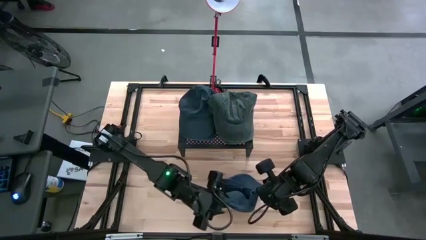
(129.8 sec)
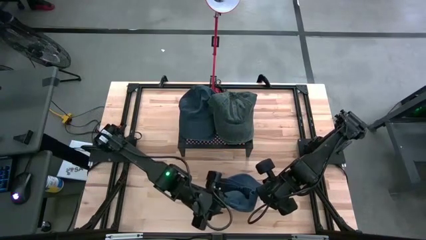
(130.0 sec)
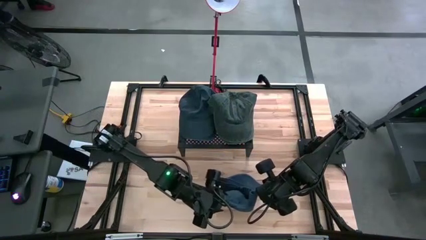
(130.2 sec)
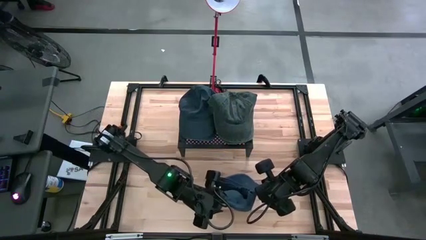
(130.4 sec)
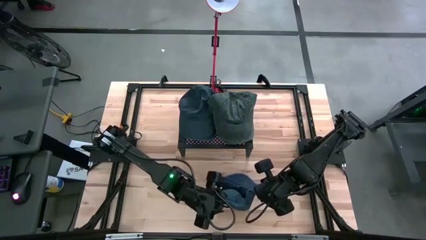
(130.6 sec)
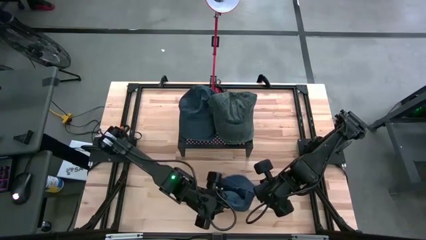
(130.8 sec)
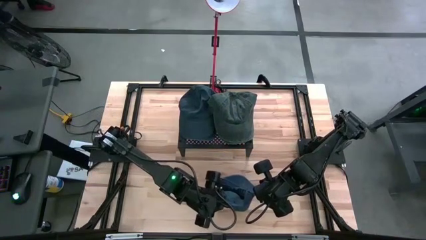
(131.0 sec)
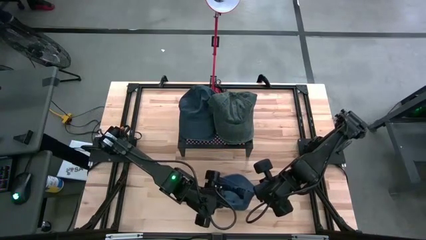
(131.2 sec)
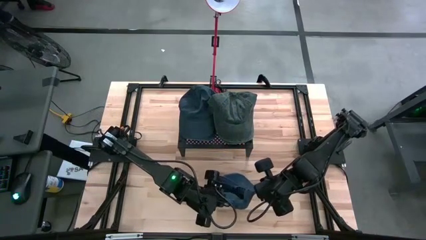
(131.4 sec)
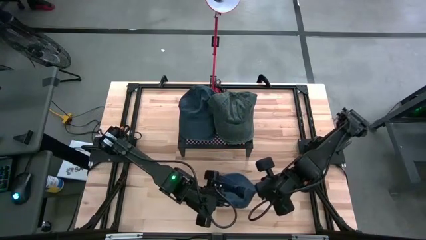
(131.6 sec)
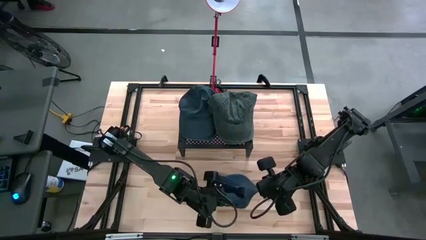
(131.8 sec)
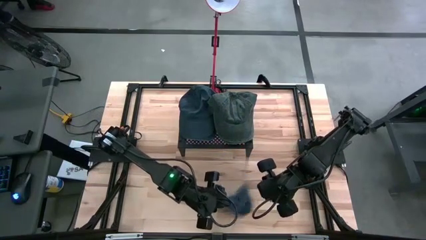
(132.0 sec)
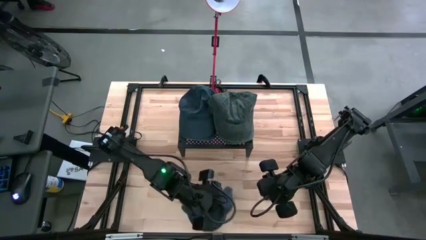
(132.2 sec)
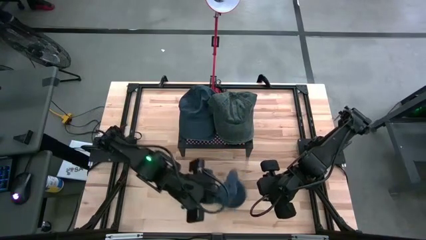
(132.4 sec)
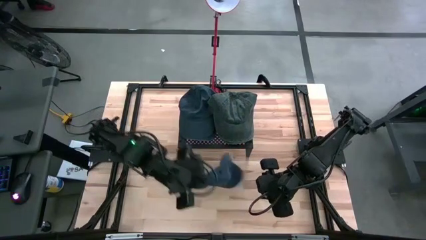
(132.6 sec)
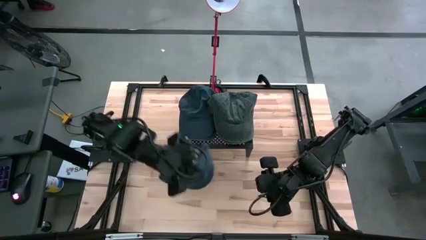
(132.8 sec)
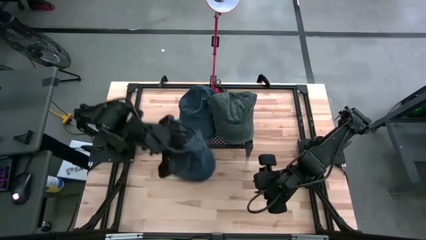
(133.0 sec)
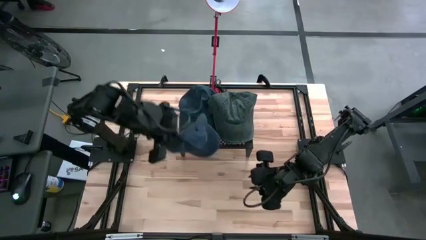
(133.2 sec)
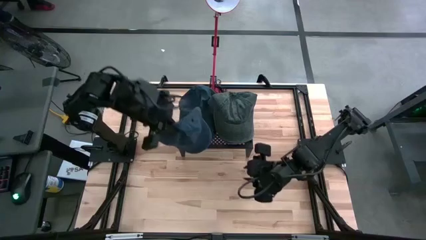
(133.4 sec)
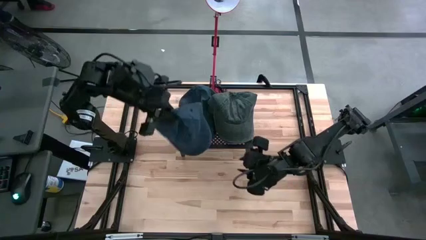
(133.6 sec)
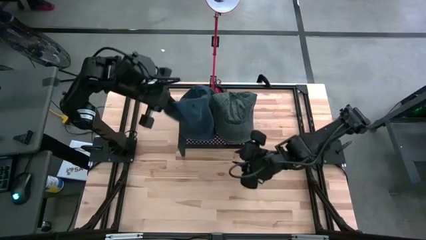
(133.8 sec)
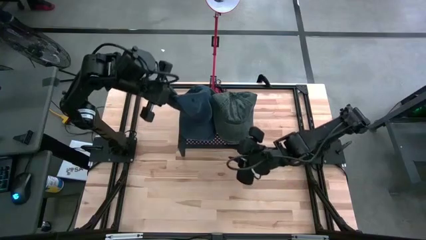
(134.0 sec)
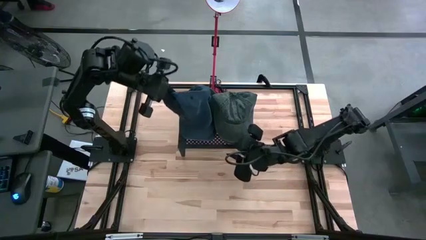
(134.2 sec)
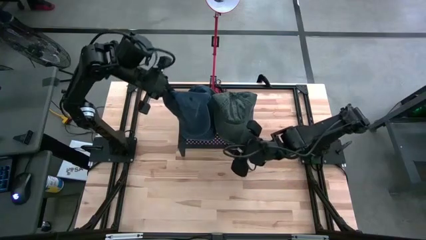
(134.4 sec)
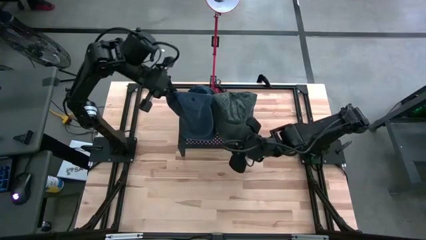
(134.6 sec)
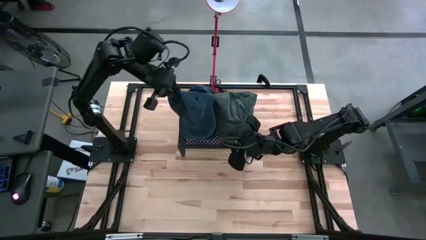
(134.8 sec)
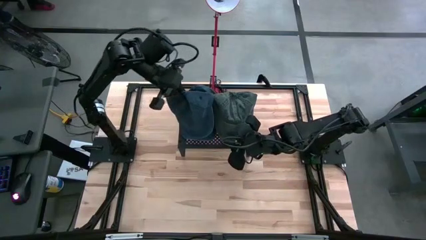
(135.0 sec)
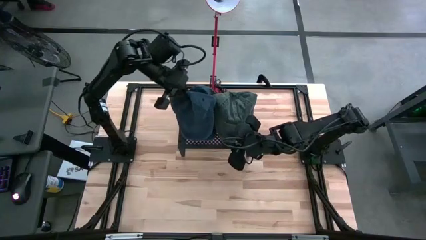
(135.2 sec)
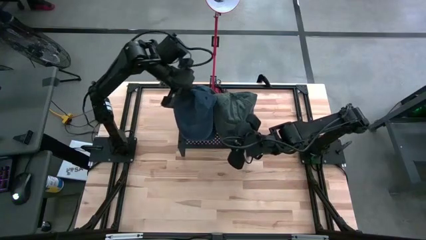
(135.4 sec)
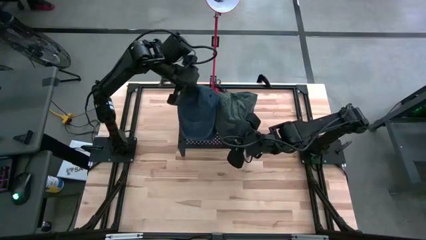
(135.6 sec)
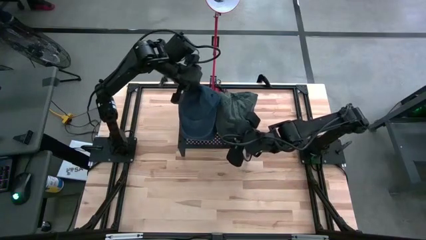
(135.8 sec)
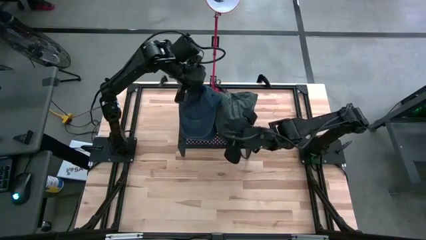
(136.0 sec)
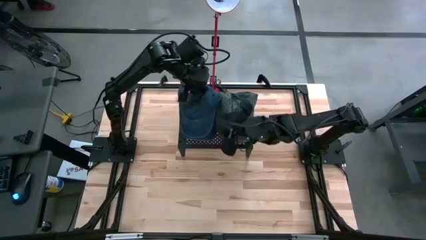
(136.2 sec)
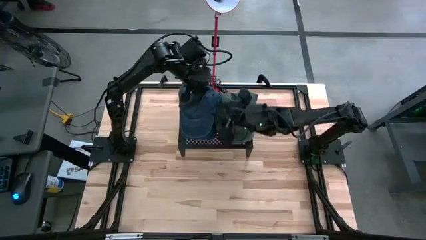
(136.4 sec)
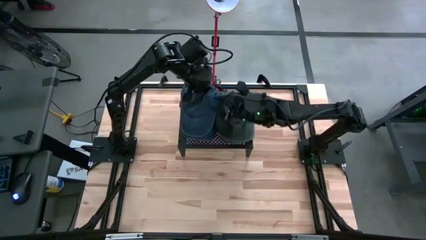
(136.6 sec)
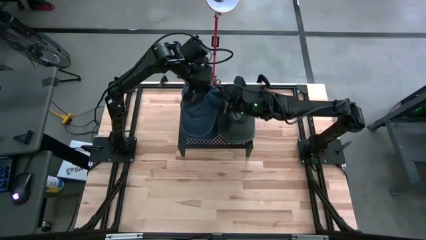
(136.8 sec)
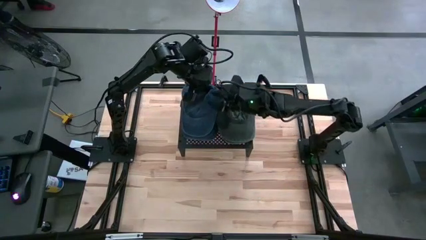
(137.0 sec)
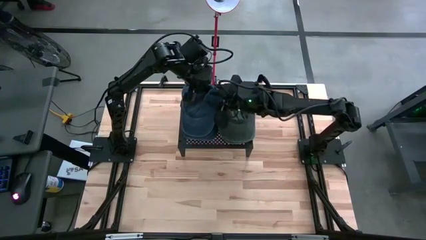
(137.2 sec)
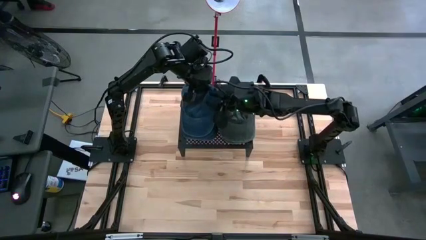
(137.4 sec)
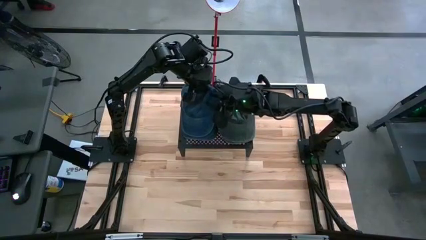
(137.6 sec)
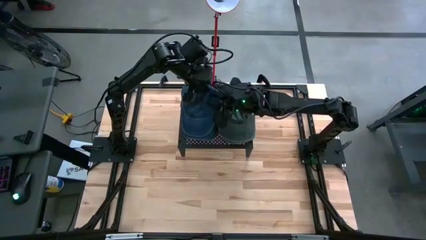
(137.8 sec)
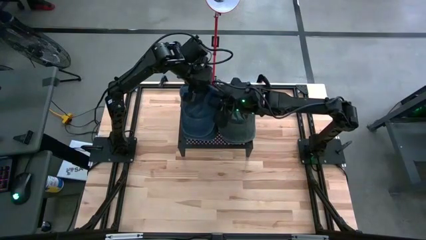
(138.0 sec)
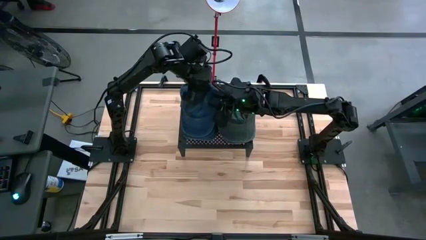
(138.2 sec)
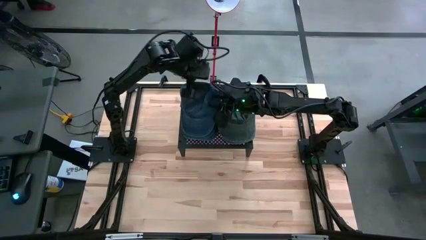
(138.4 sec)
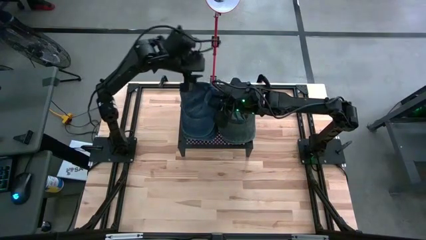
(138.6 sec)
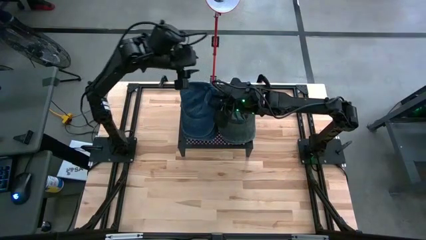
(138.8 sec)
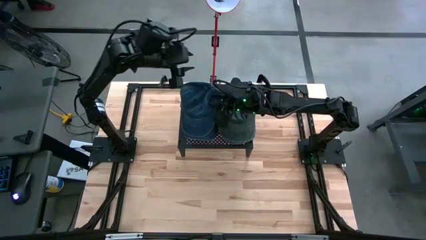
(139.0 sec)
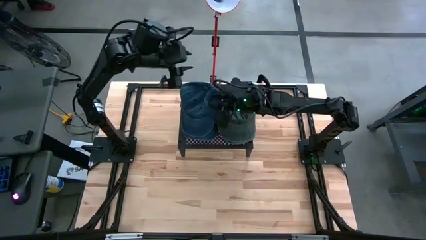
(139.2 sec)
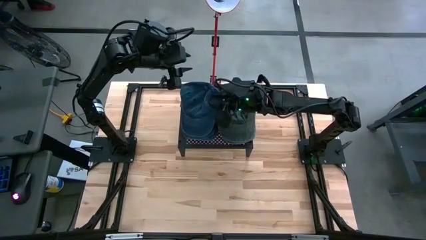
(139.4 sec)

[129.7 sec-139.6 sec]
Task: Pick & Place hat
Stack the blue cap on top of the blue cap on the shelf

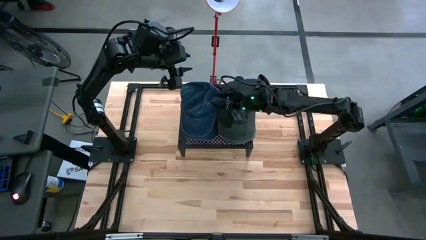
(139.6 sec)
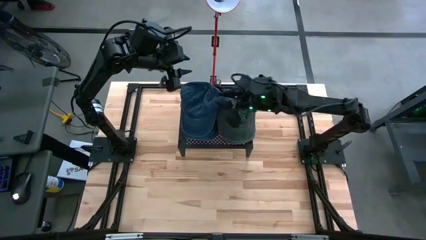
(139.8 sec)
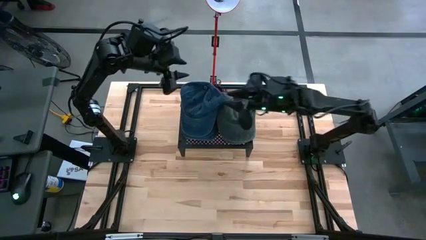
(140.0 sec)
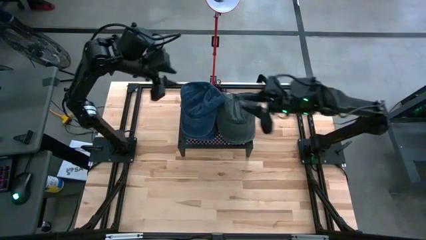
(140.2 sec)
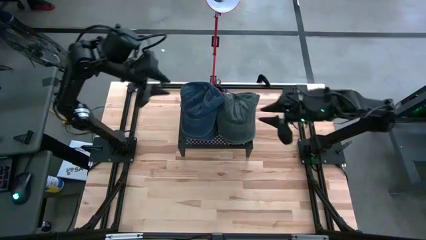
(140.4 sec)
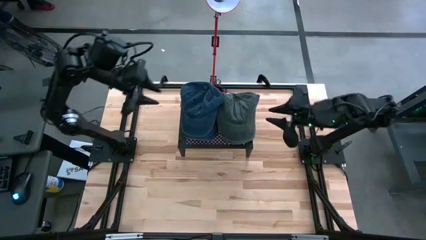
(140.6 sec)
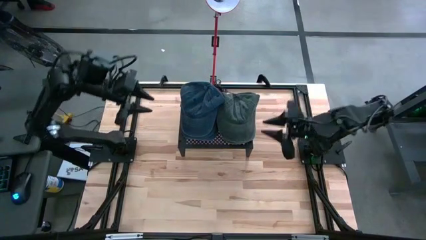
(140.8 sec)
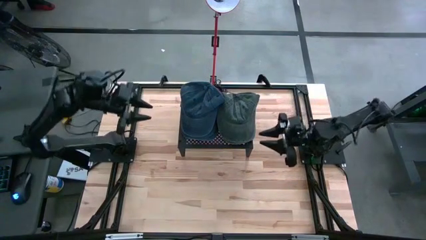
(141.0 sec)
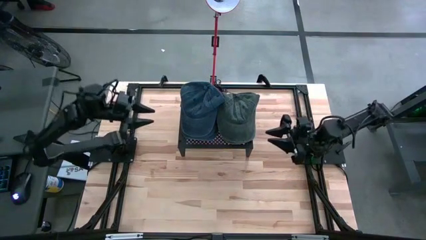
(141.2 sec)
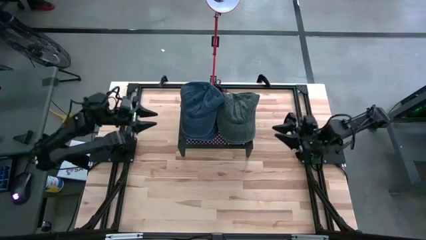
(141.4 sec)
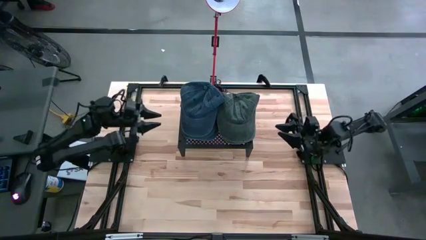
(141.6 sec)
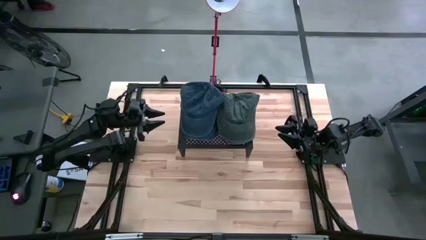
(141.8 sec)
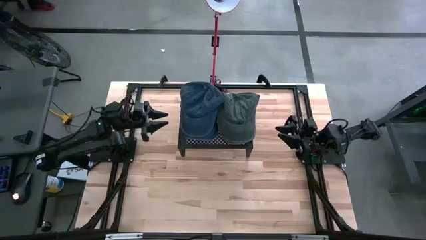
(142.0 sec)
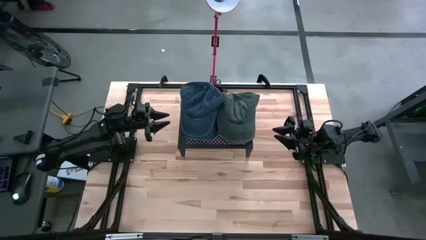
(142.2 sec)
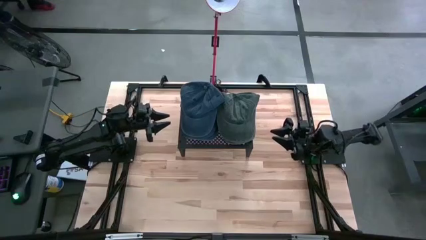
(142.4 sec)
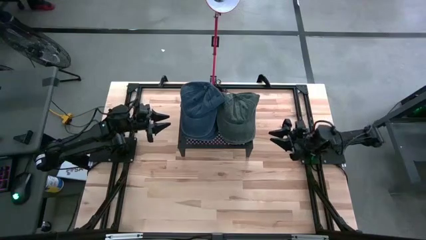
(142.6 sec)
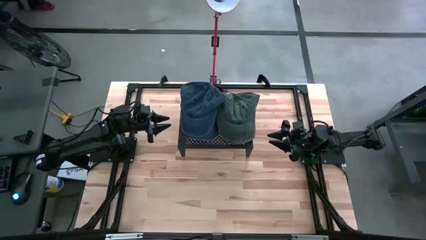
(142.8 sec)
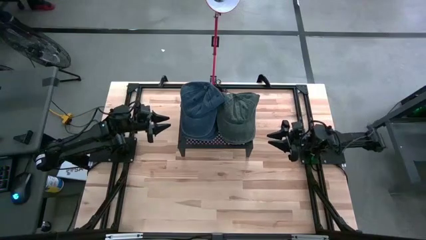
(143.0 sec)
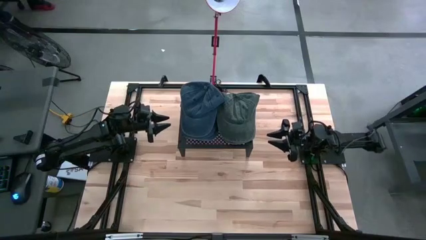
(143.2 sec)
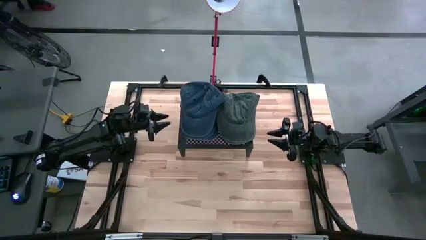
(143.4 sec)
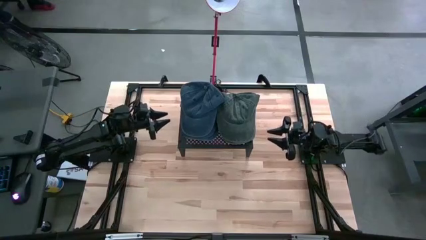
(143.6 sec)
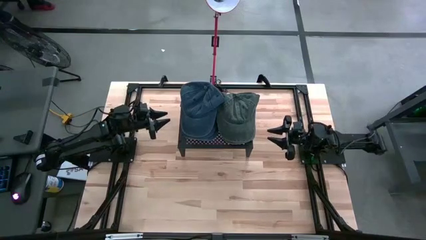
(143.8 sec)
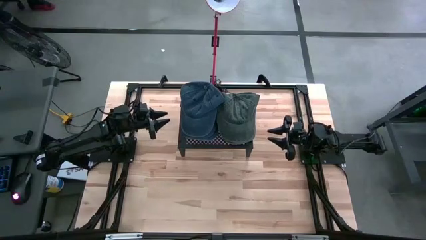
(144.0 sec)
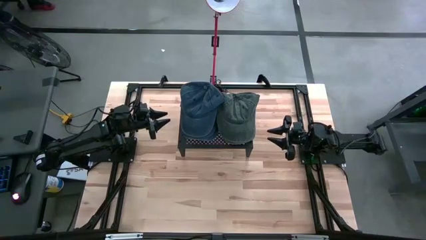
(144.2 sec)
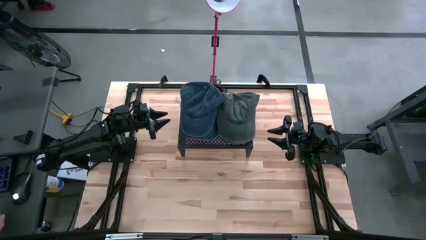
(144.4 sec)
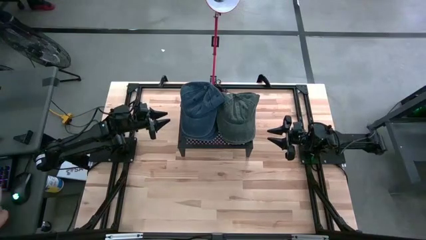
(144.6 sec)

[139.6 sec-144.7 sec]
Return to Home Position
